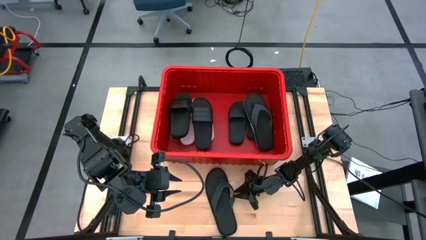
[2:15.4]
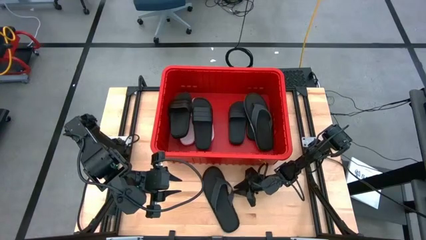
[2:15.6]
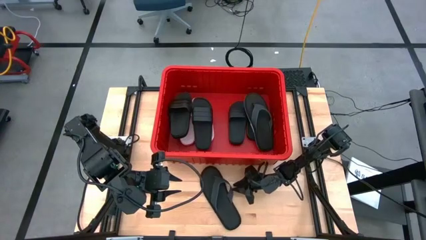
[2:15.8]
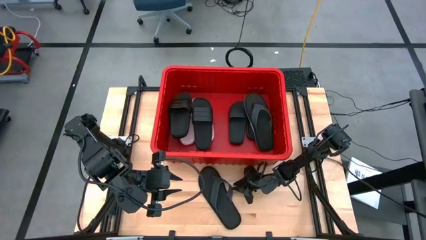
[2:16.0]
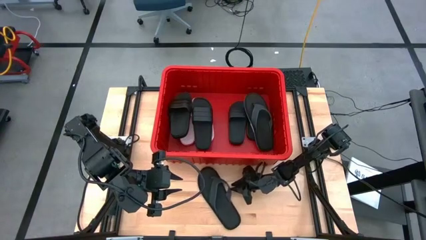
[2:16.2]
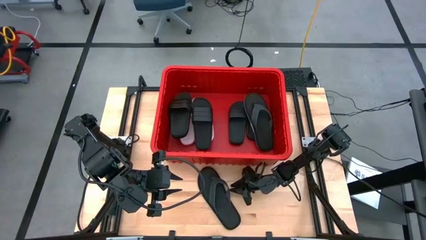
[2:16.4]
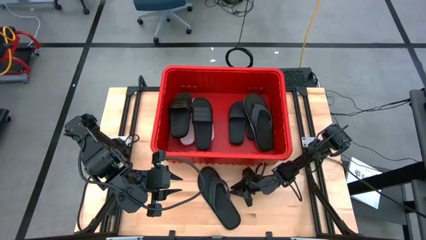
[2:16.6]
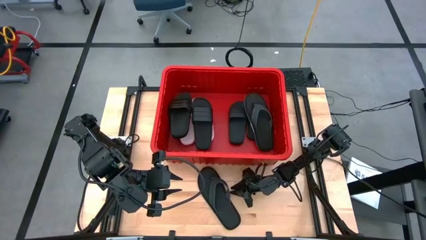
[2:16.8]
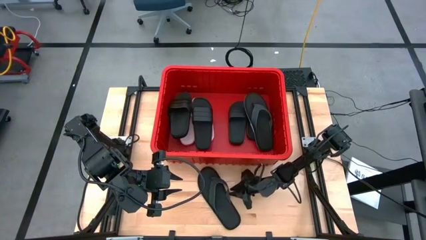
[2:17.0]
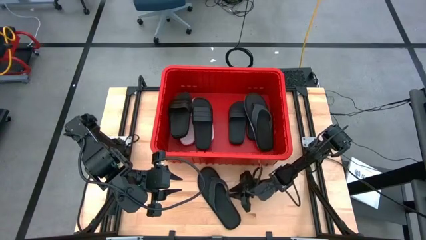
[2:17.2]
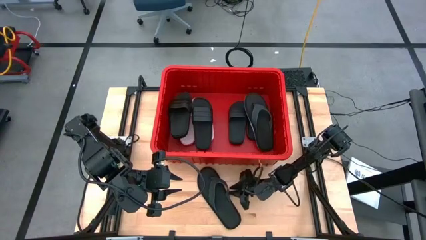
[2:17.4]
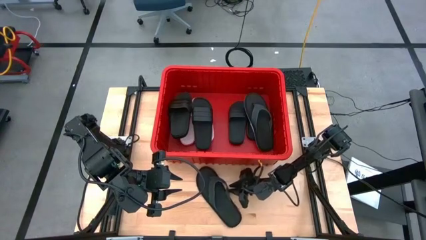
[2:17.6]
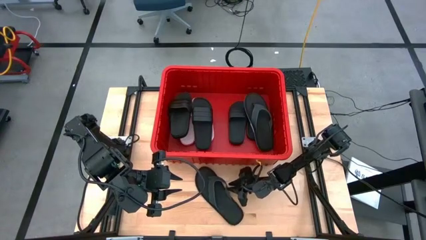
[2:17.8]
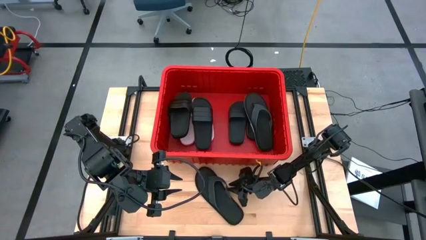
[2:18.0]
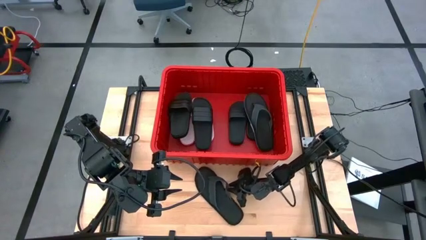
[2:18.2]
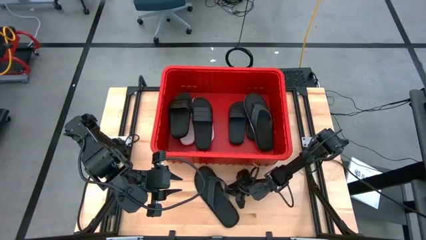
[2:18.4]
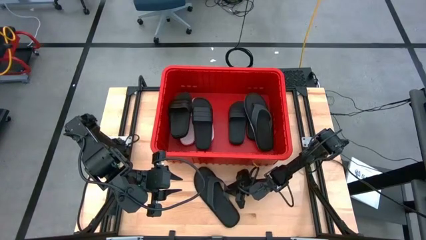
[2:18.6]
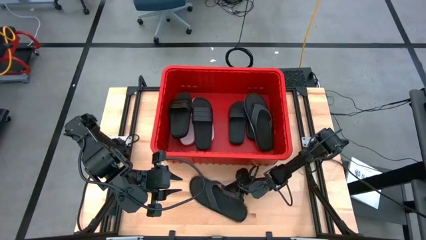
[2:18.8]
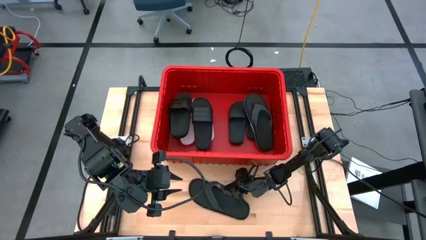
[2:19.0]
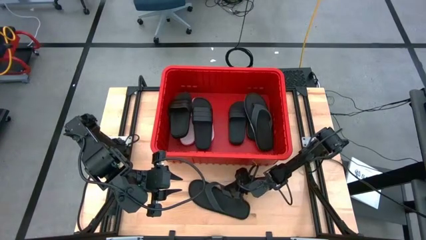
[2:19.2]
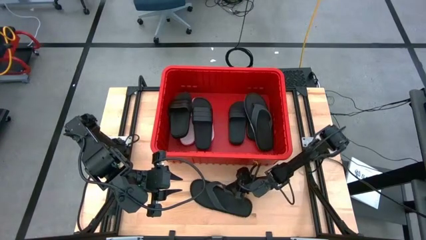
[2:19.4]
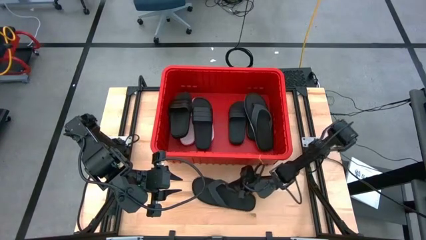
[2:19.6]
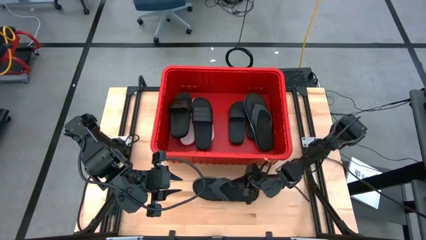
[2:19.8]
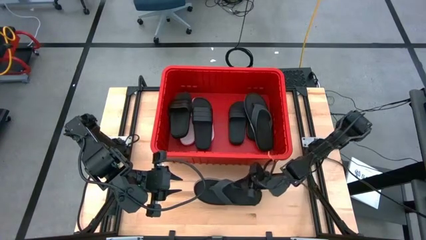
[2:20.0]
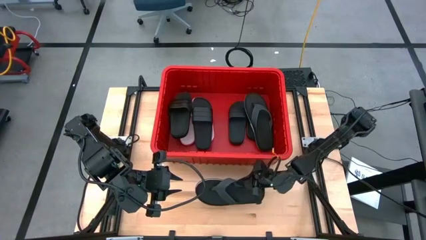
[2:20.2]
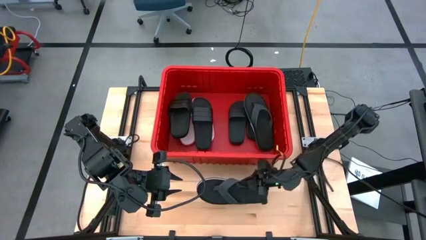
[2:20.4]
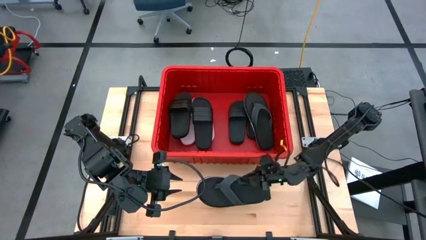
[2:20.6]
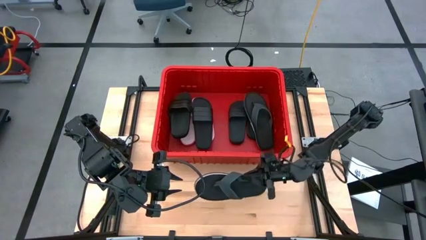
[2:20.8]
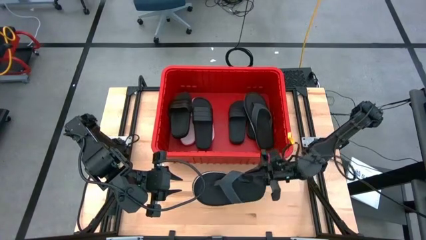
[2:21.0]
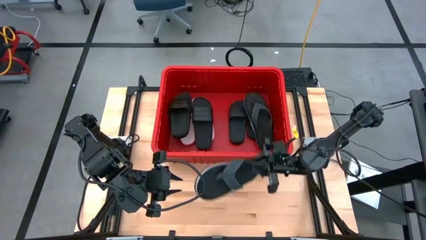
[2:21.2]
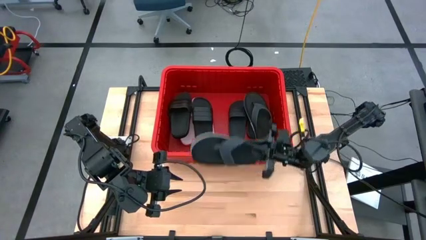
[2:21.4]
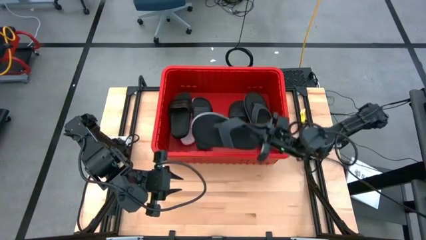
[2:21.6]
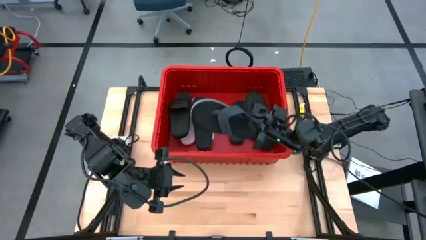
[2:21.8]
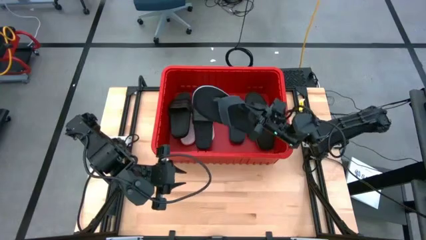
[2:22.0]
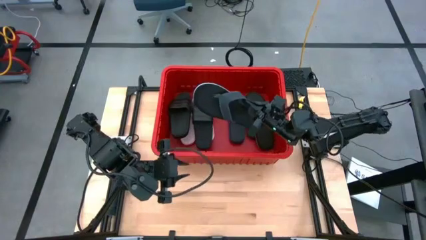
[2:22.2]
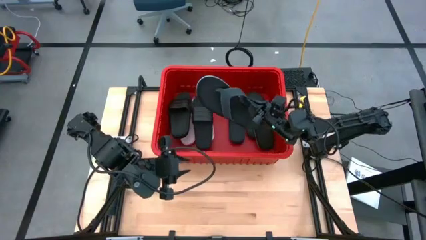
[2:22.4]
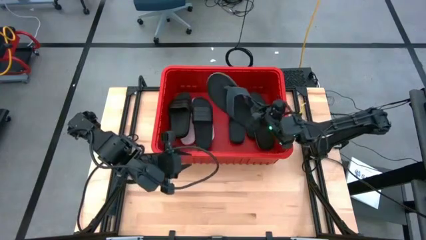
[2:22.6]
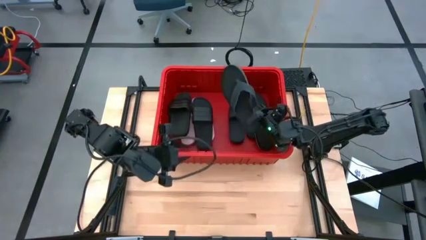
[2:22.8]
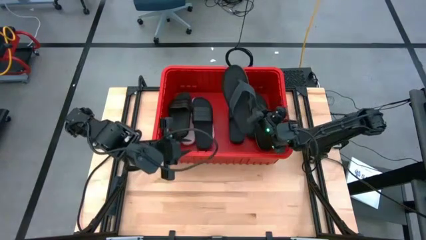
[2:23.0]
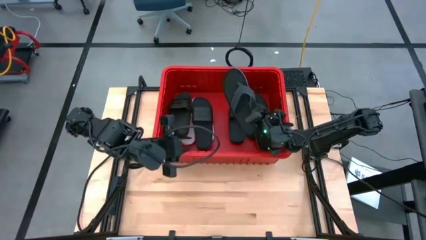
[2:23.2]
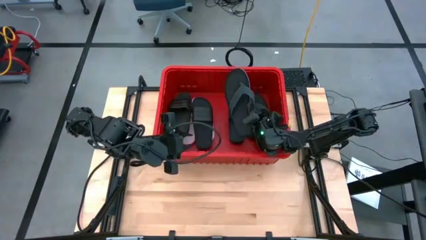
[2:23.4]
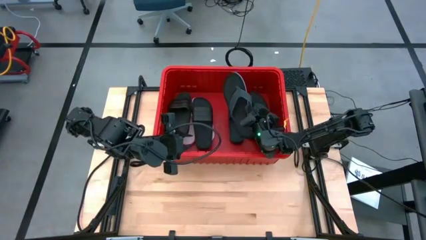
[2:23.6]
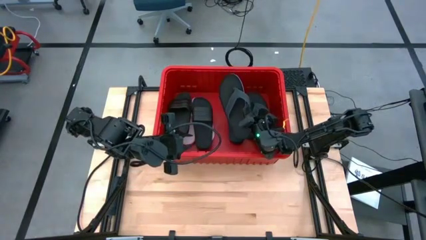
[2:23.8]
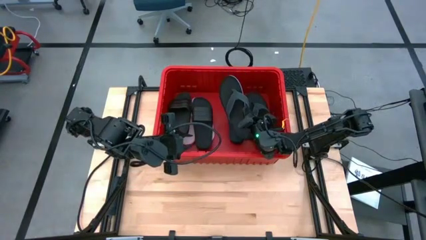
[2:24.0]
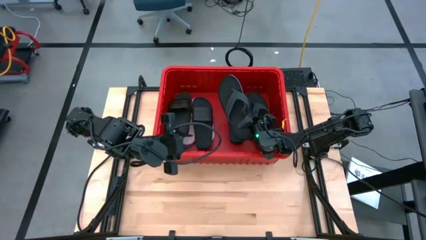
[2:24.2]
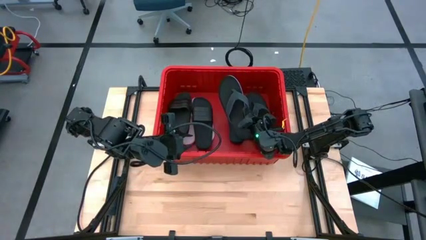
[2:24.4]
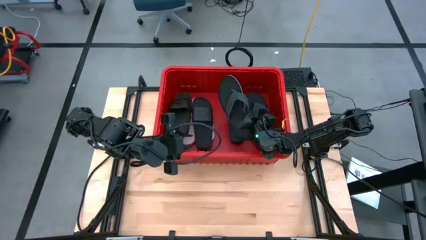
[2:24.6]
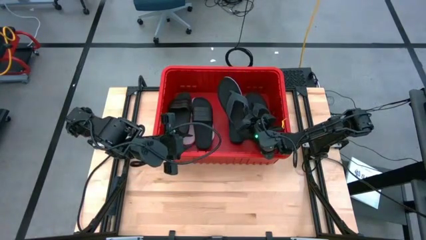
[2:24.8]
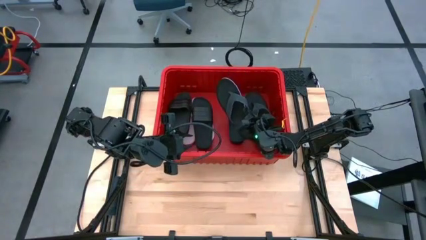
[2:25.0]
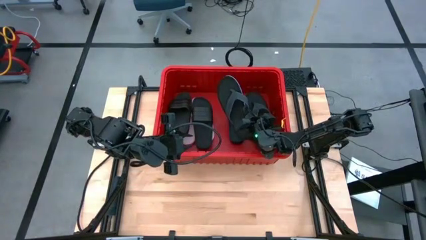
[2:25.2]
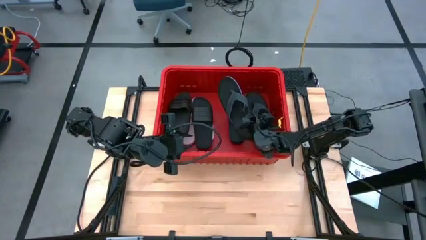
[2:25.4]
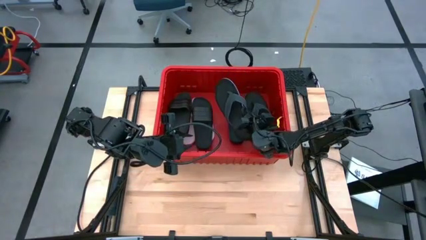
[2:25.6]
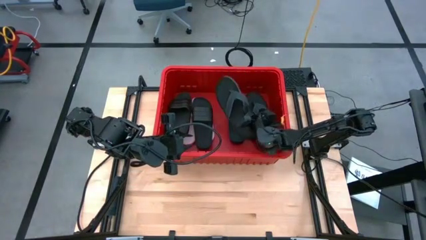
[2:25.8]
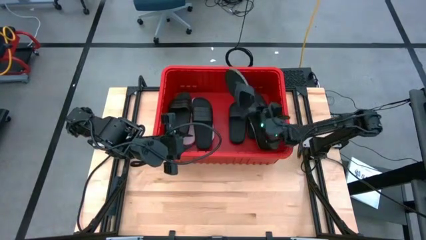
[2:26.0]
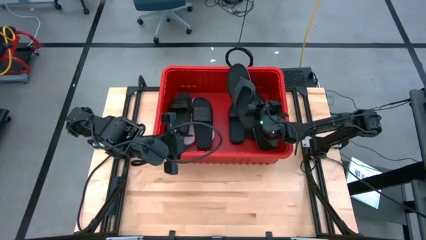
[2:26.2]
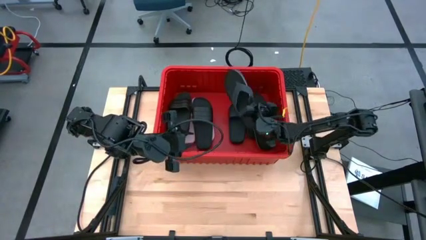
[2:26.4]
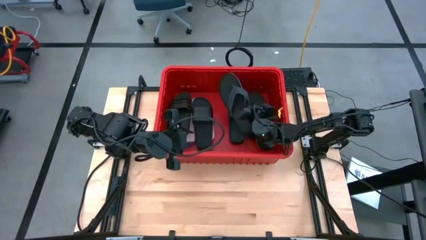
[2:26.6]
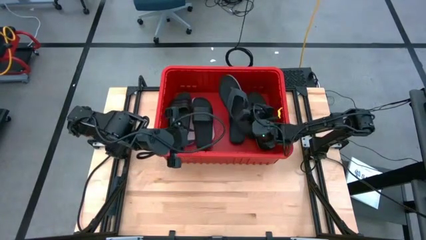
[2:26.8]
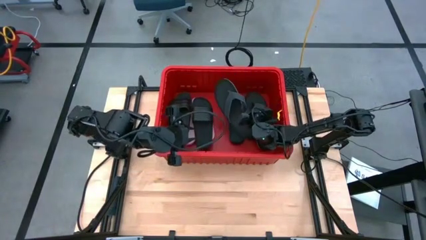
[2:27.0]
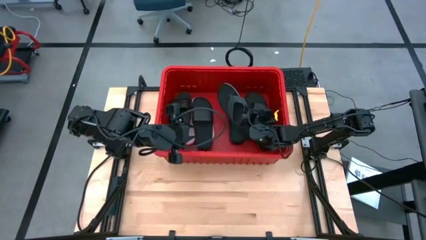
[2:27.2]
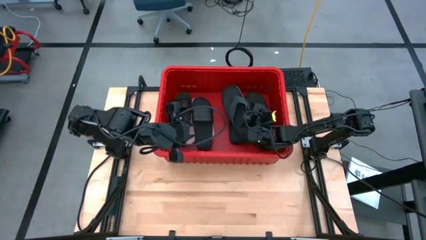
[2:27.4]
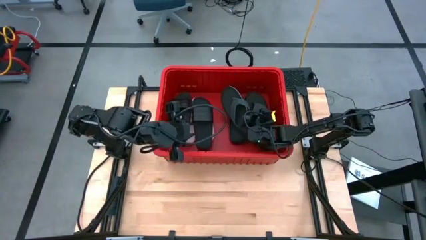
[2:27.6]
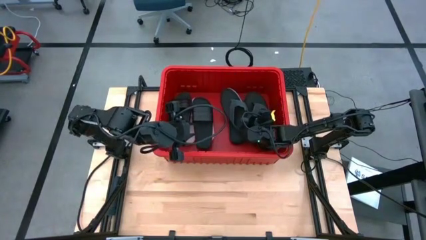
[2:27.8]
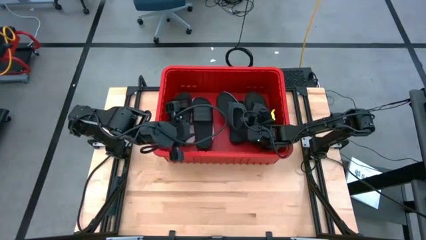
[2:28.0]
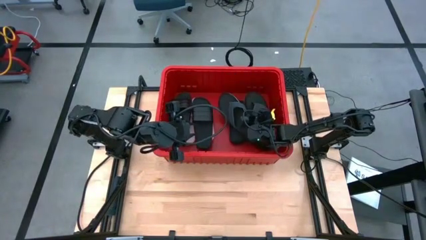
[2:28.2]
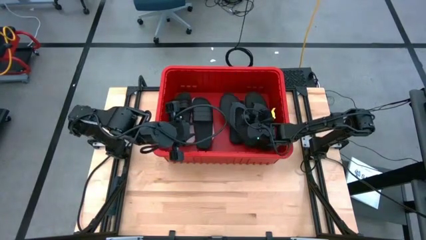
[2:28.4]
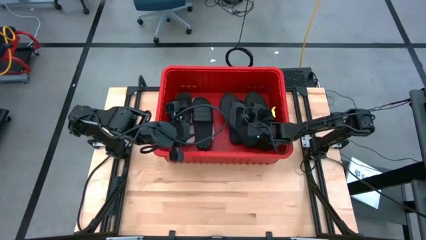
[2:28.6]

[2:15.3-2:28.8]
Task: Pick and place slides into bin
Put the slipper into the bin

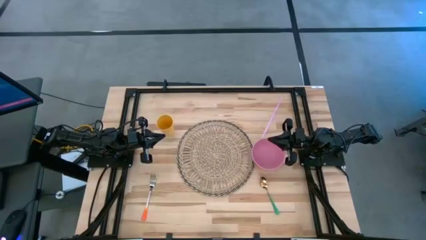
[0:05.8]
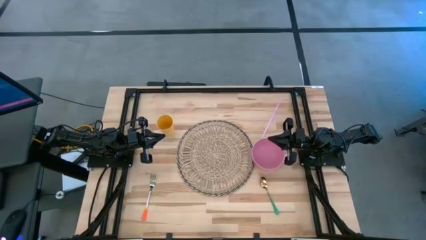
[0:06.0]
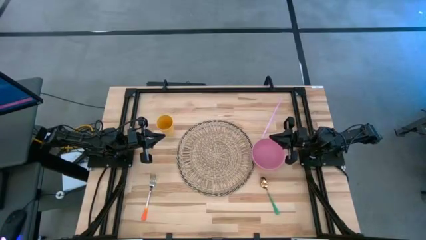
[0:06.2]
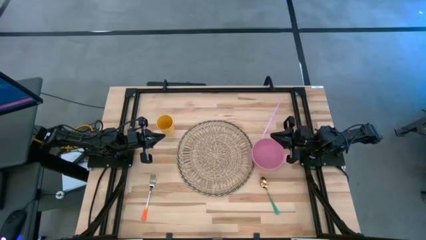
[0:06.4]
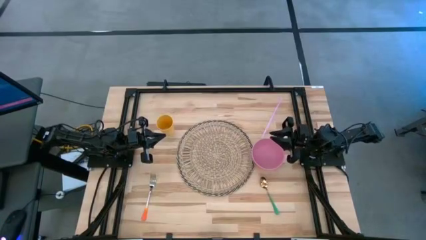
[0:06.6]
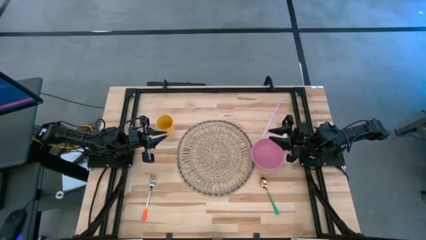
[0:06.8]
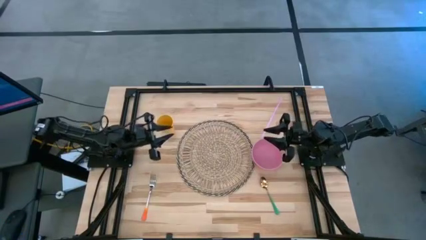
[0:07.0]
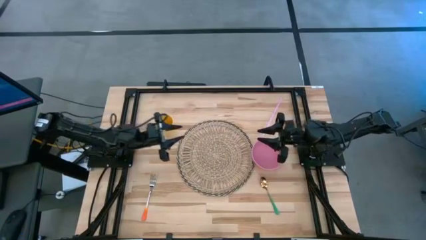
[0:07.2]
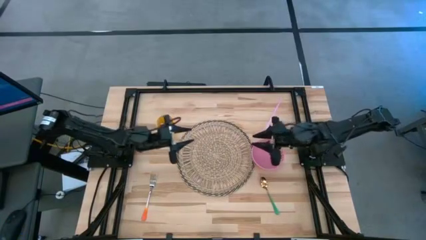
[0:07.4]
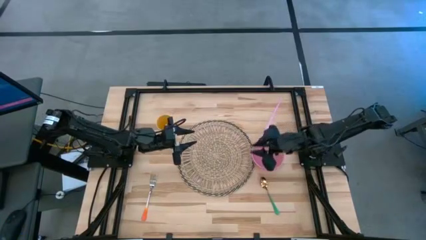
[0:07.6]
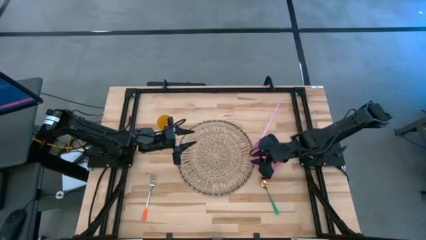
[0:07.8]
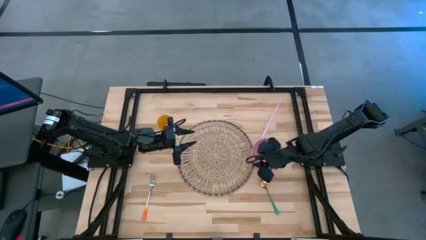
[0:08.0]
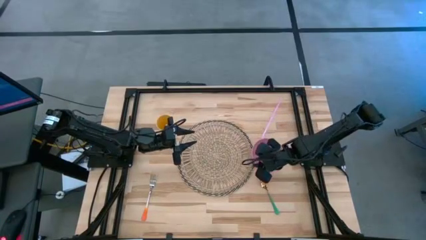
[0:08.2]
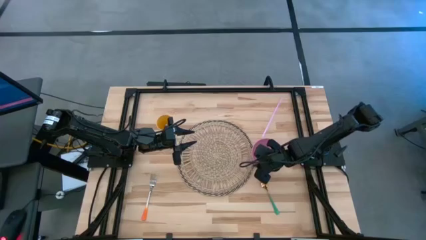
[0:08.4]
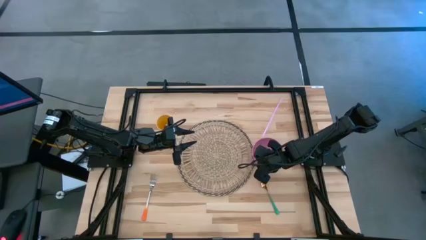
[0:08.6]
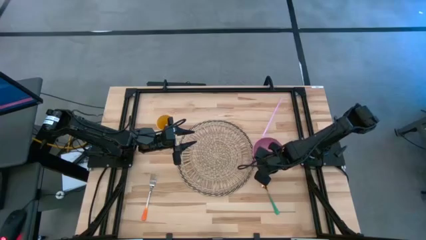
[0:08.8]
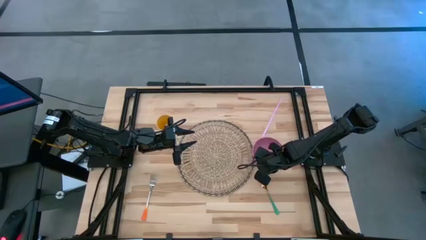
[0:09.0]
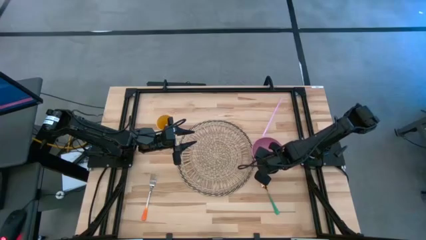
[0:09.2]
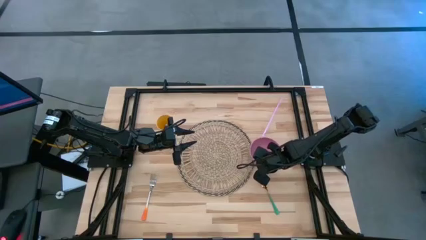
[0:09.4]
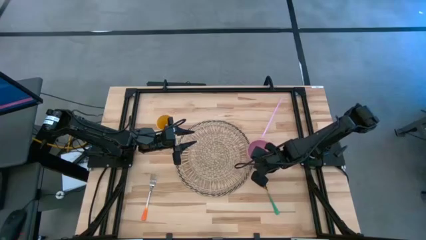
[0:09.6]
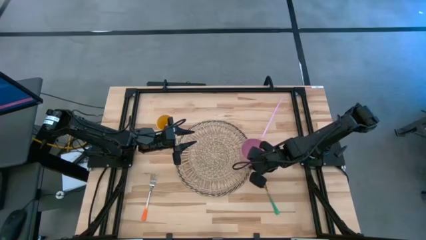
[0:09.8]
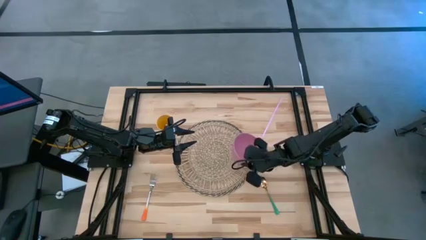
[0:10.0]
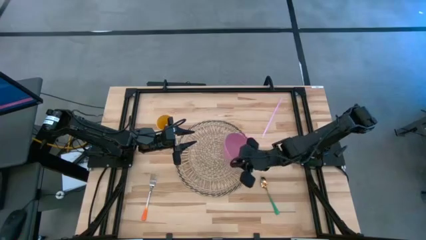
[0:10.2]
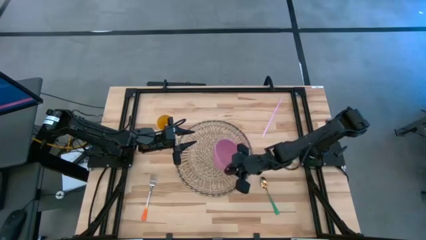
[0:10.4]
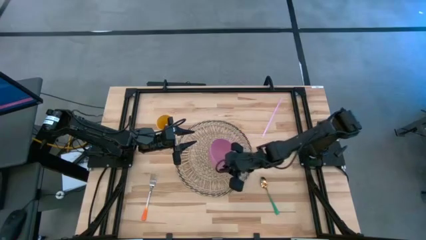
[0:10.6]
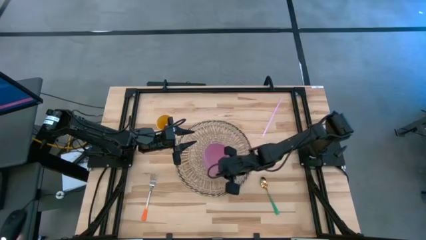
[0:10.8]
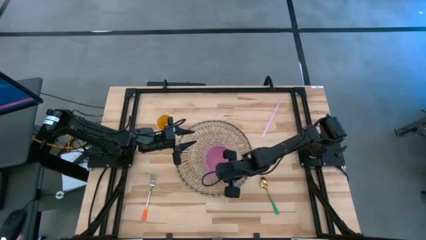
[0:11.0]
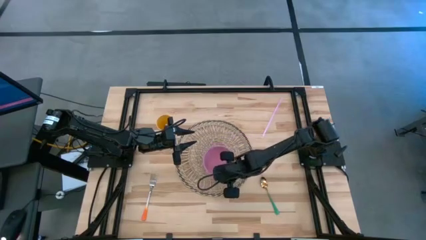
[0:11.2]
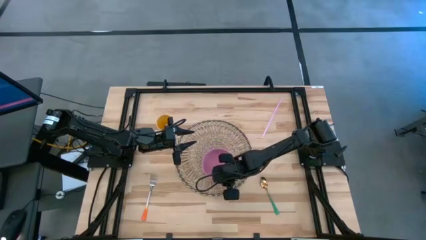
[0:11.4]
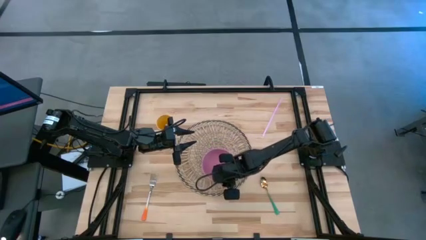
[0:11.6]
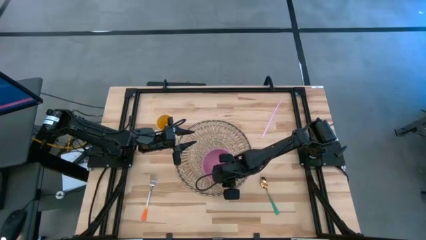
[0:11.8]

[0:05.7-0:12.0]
Task: Pick & Place Utensil
Put the pink bowl on the mat
